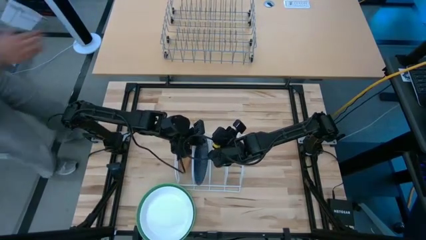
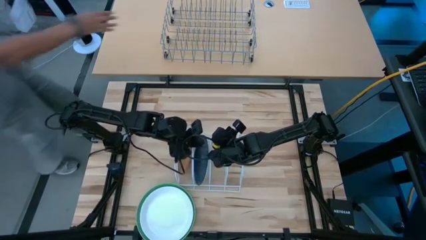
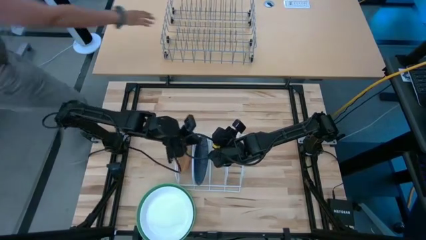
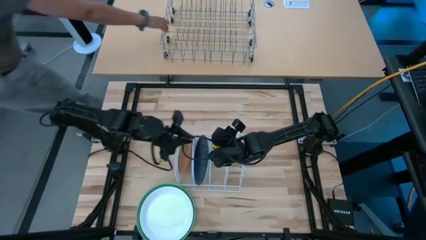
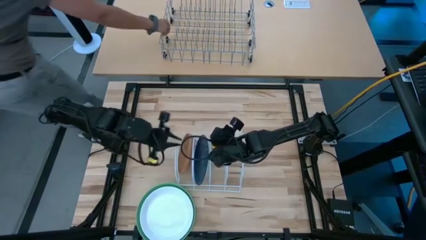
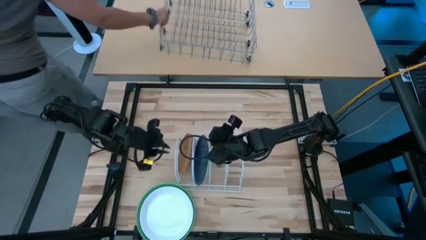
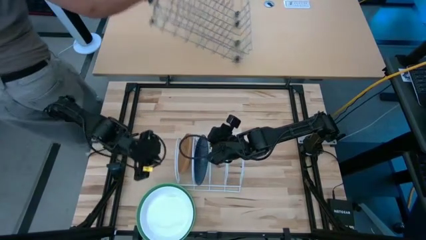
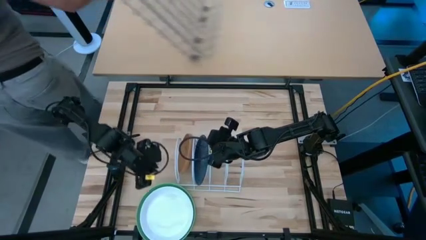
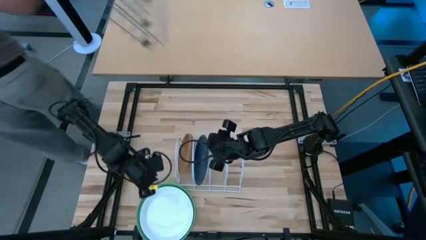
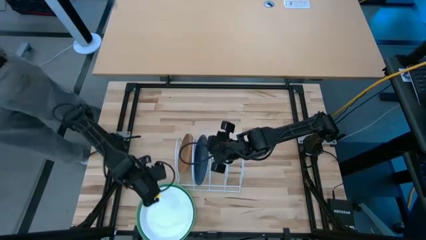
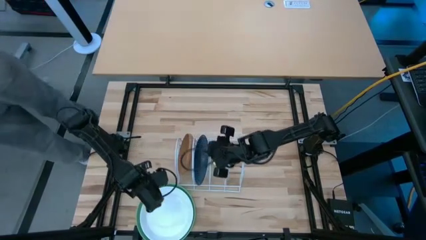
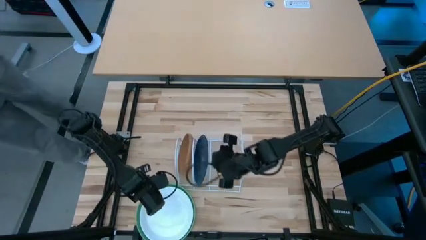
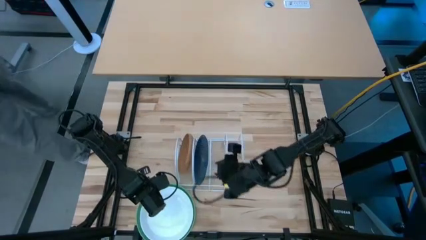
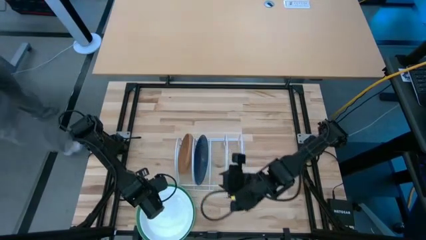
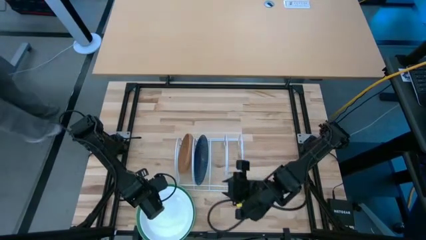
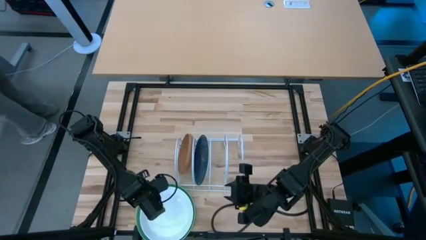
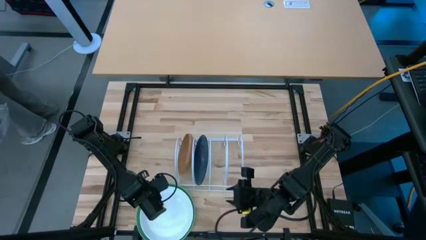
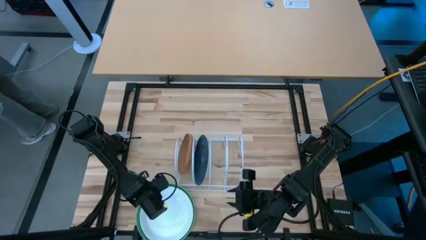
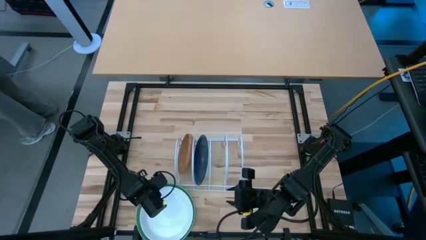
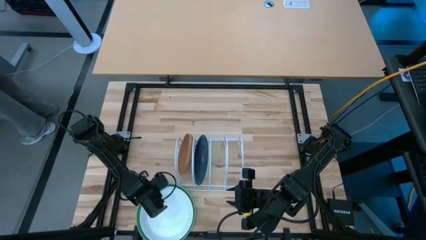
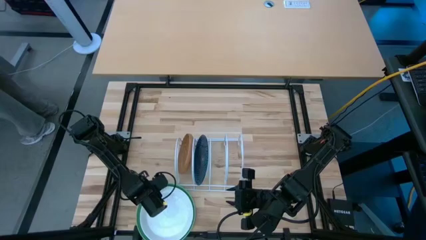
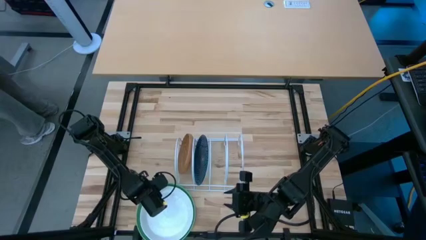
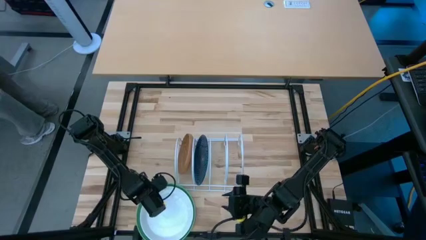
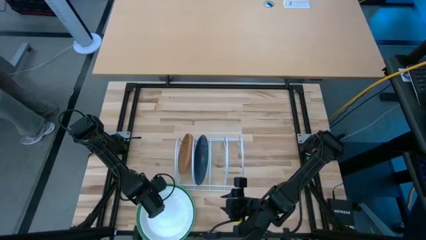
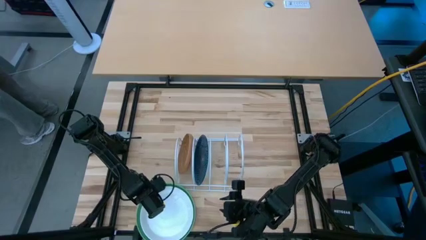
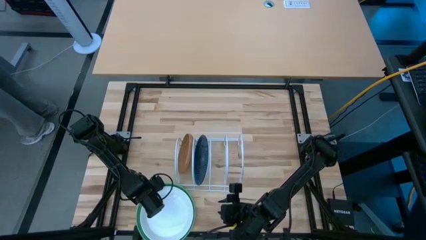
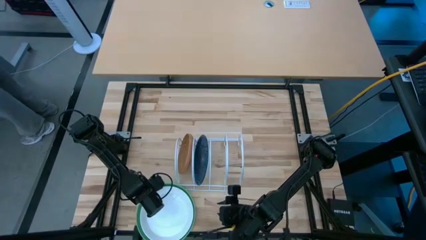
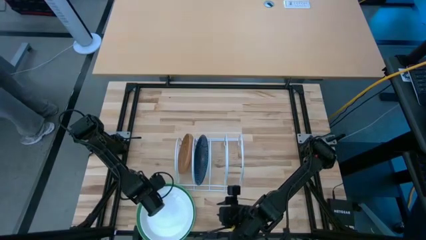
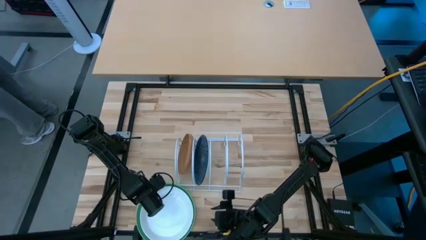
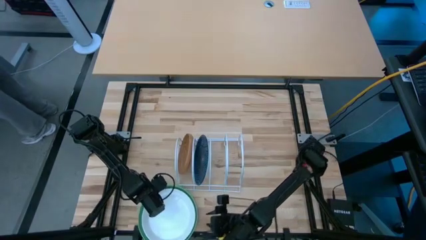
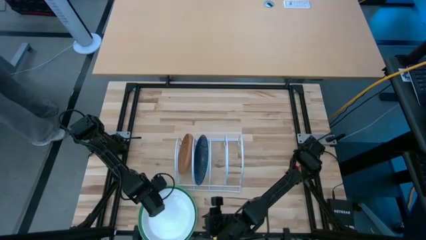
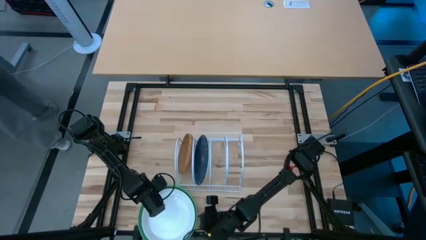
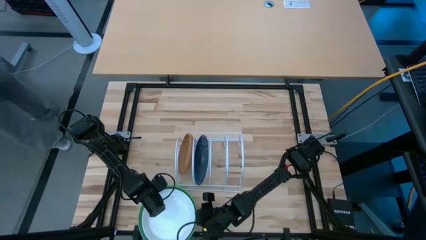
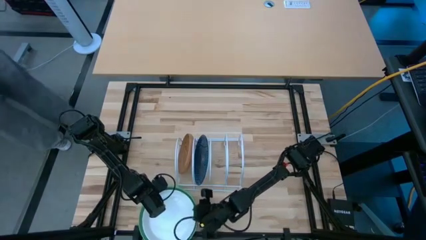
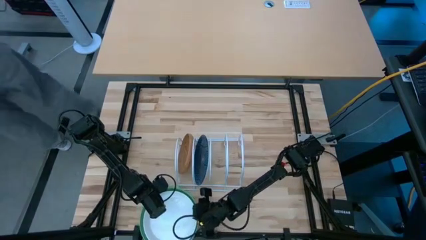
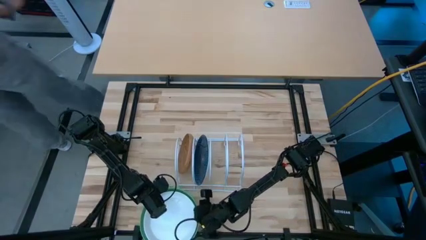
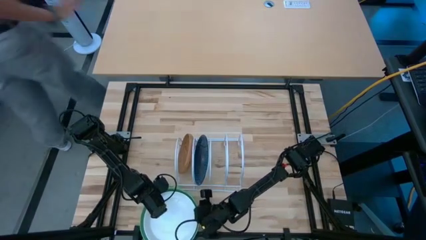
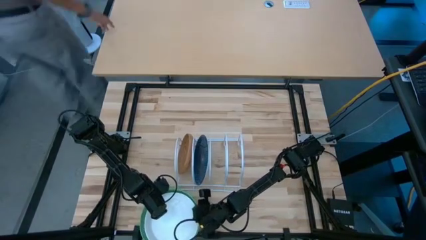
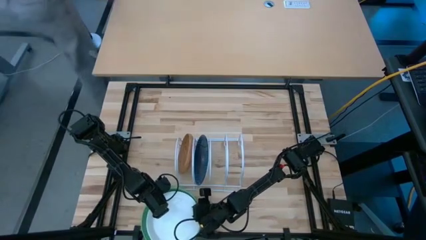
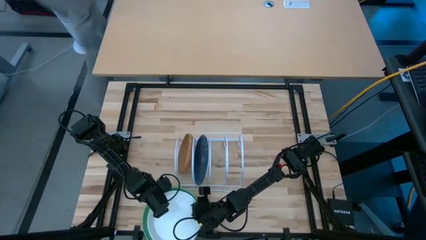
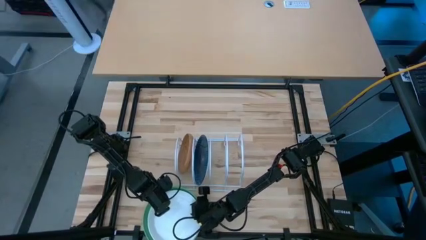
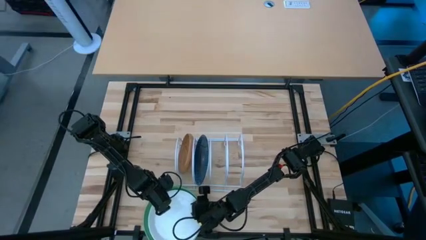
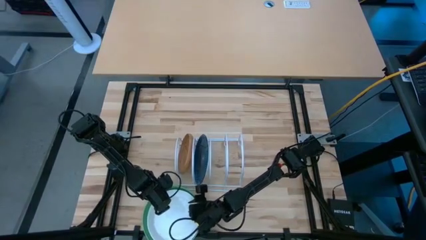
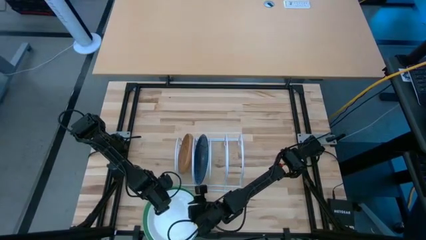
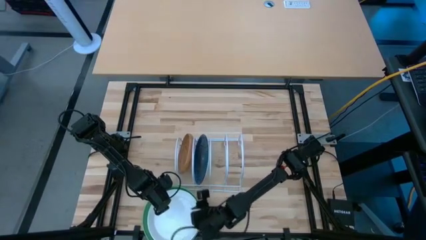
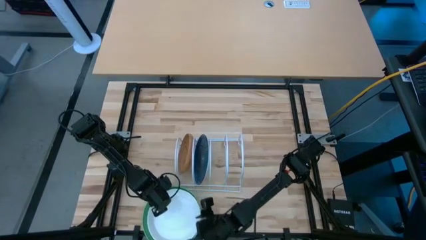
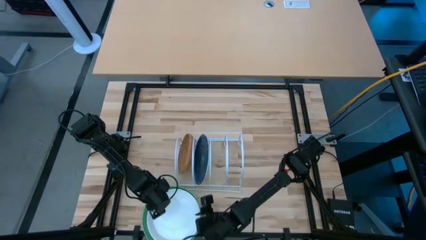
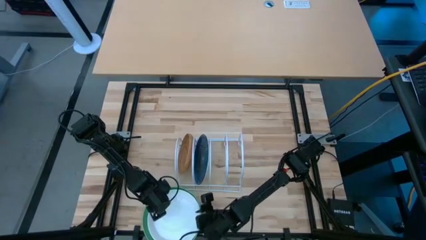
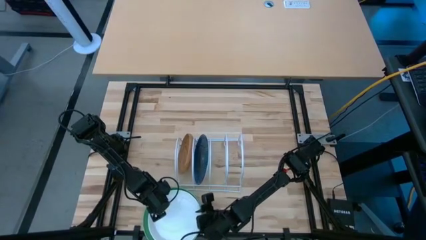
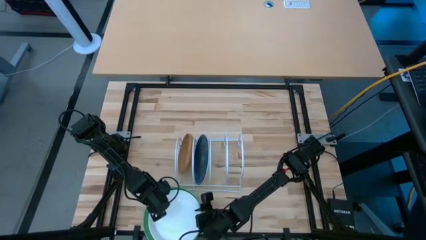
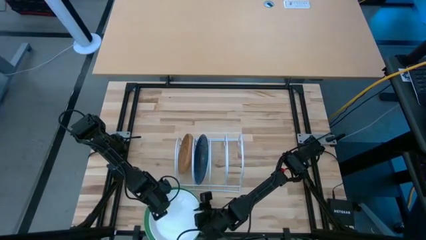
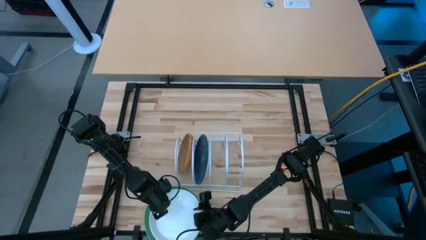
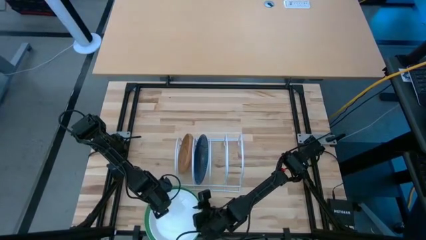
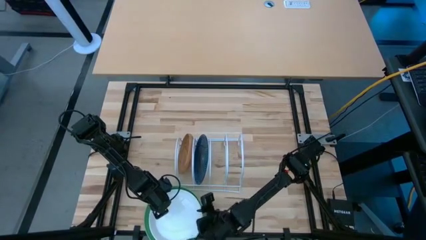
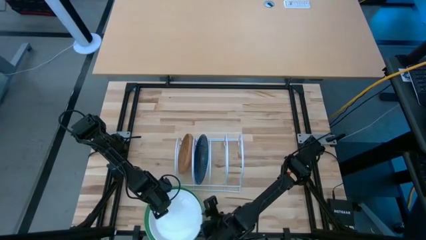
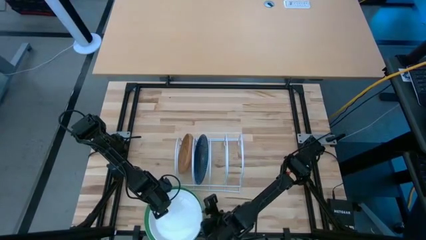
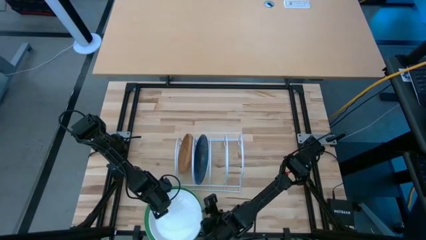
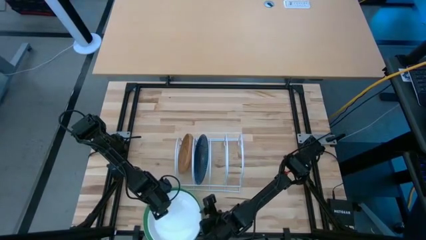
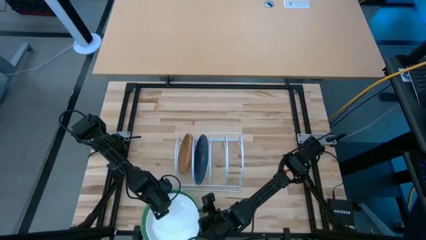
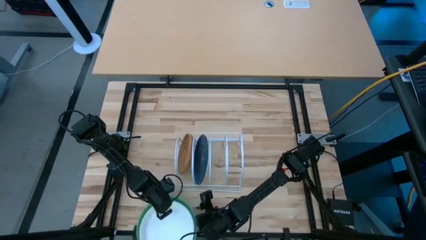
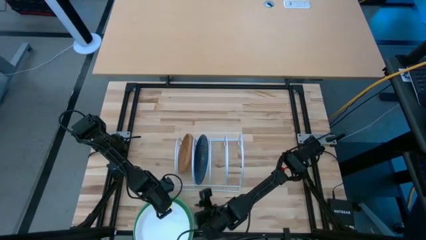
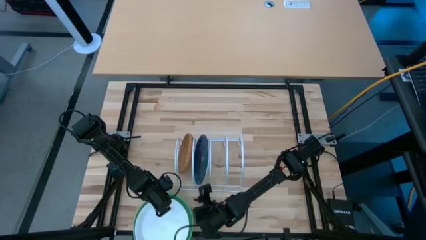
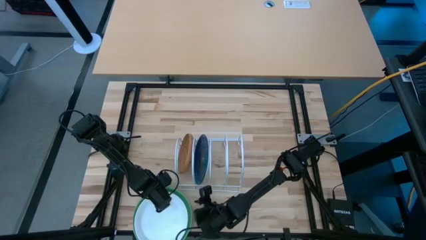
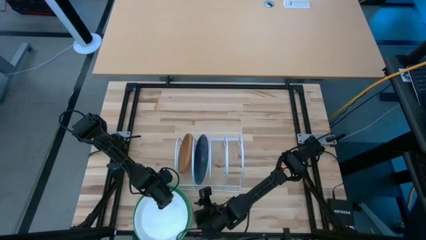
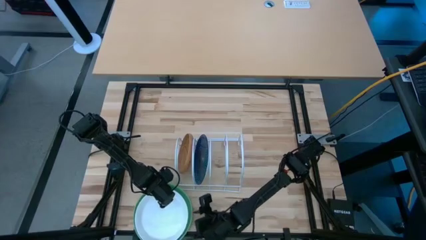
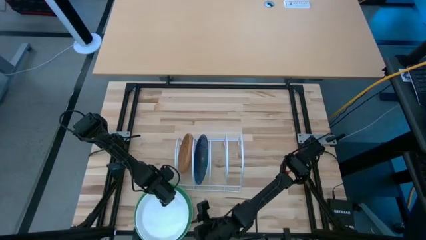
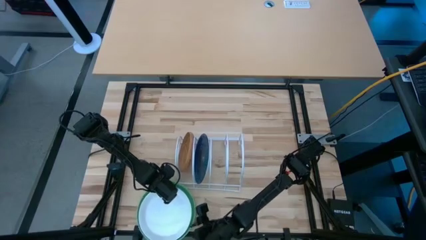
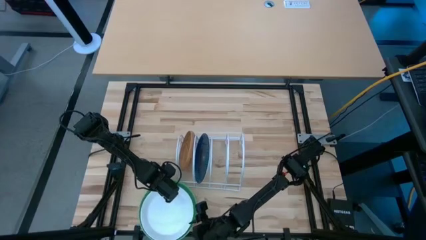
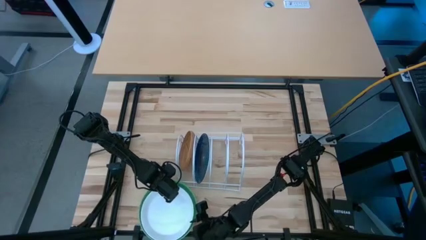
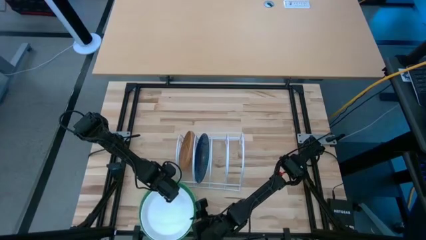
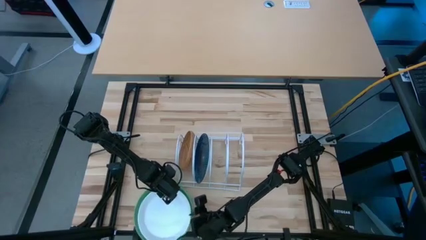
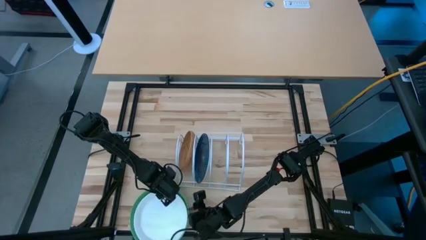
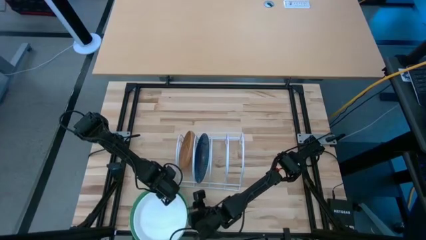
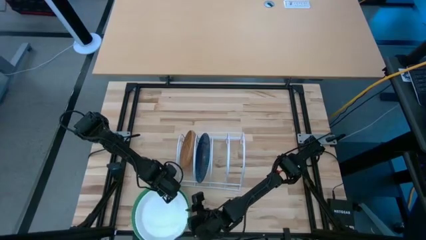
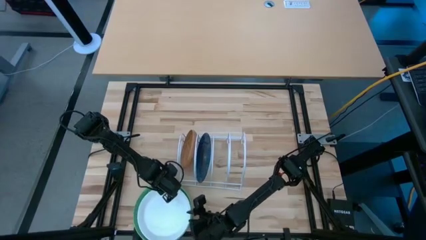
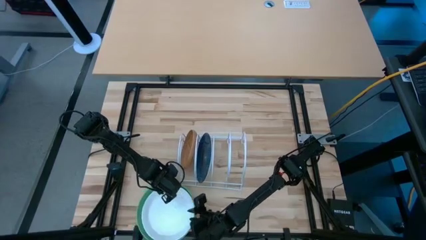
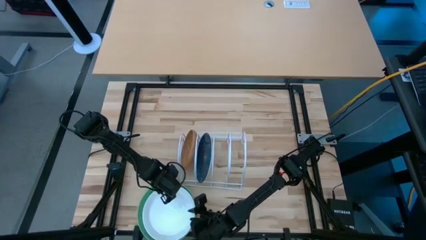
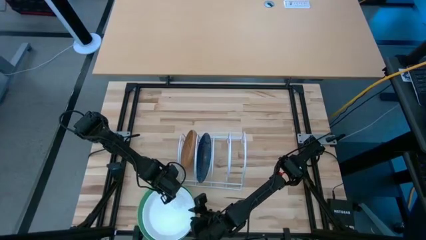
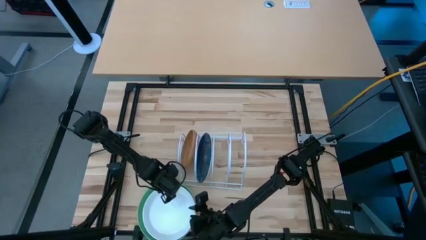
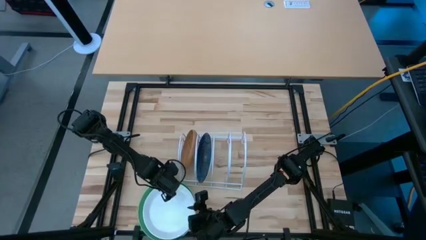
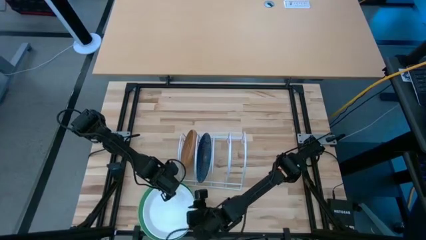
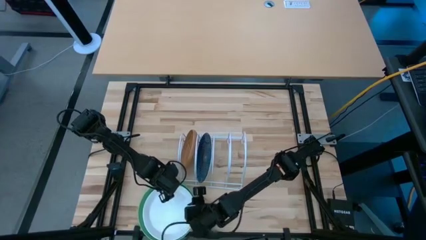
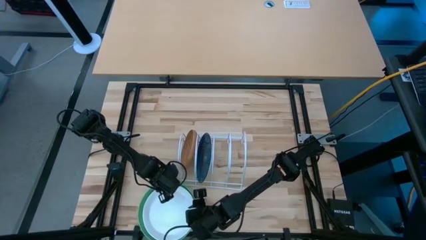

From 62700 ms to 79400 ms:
Task: Sort dishes
Put the white plate into the dish rack
